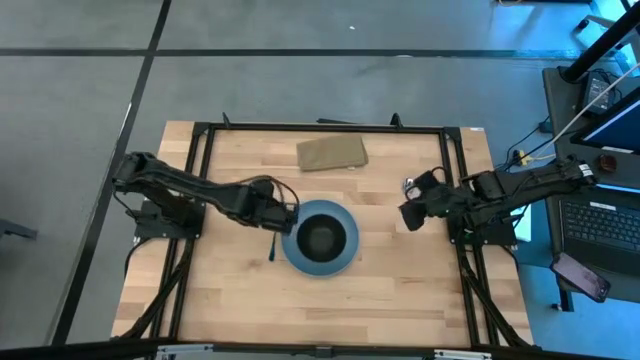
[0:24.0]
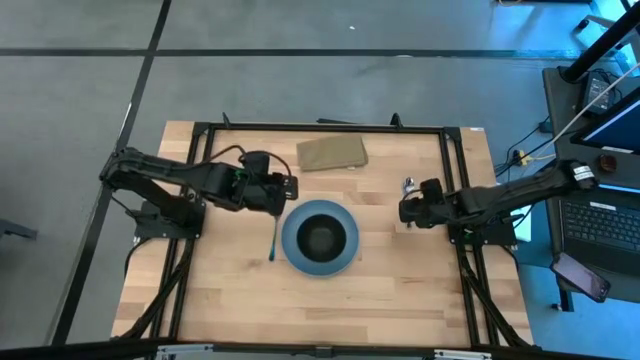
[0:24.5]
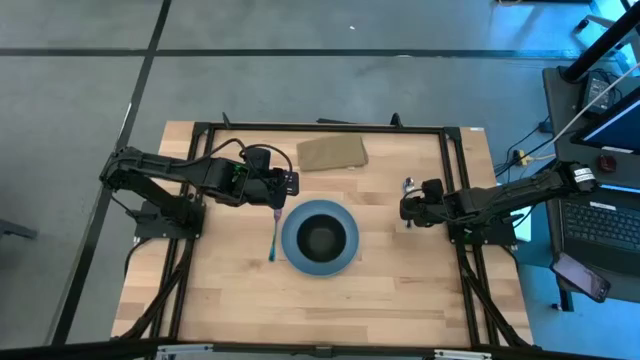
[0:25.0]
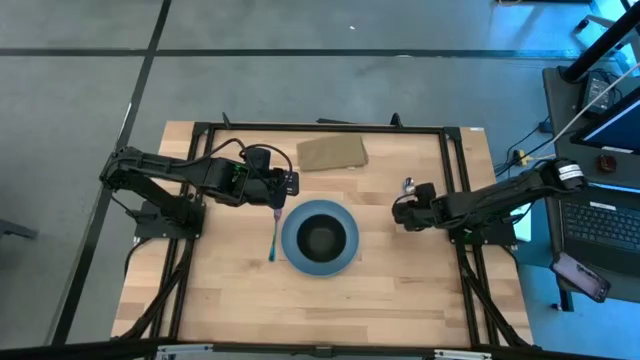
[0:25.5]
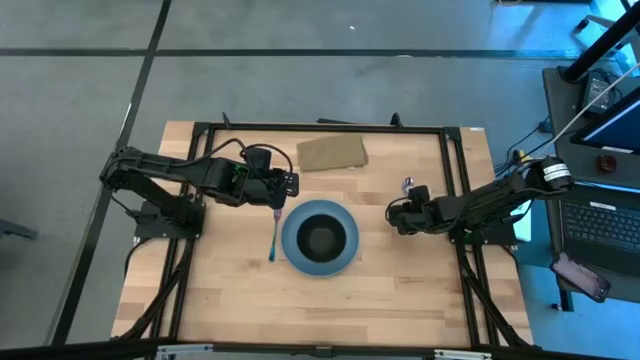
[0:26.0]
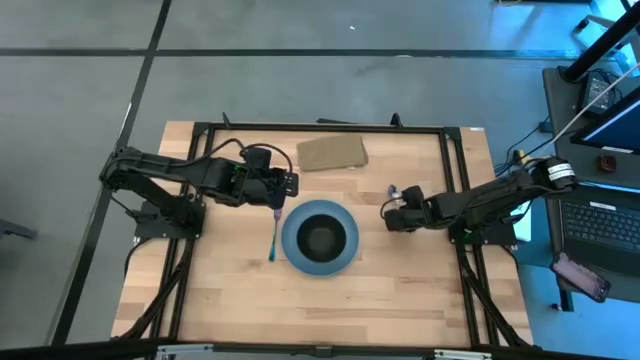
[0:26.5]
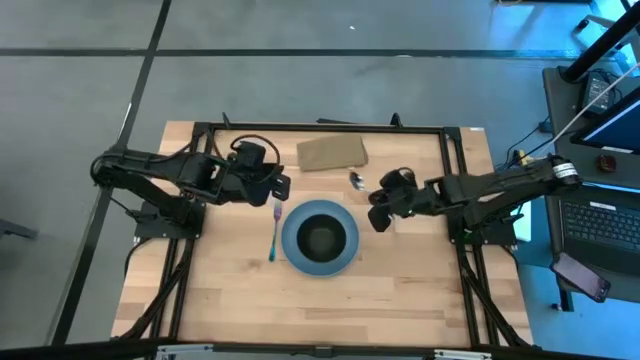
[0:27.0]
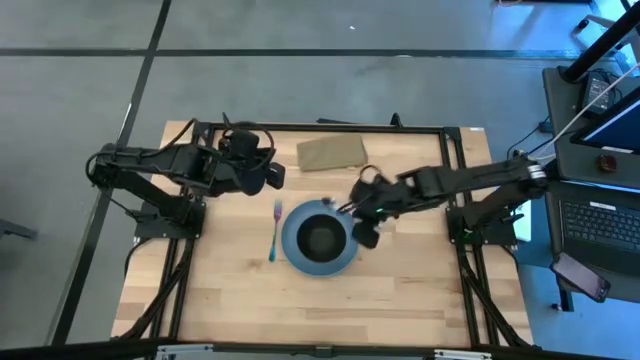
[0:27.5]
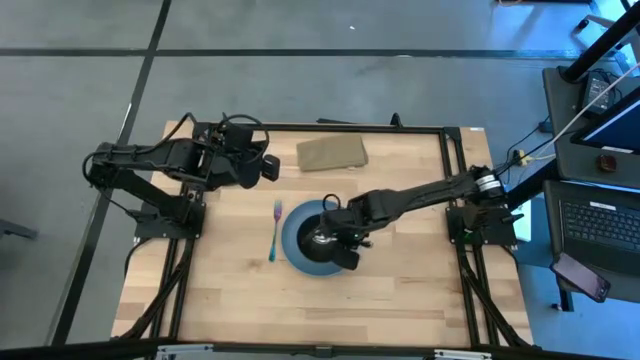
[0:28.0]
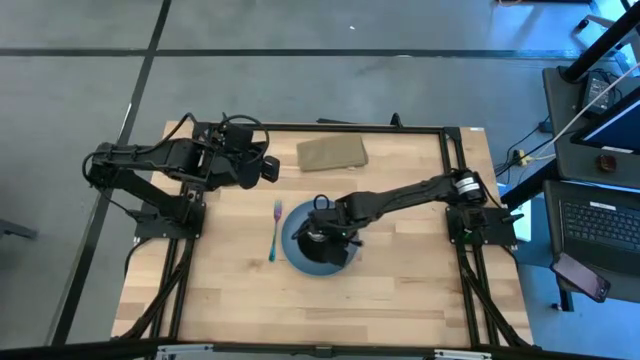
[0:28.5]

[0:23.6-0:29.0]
Task: Set table place
Put the silver spoon into the black bowl

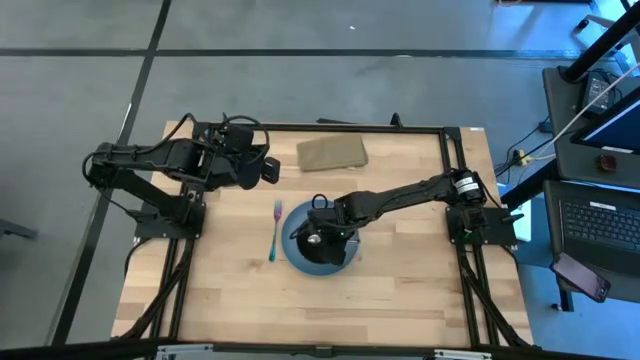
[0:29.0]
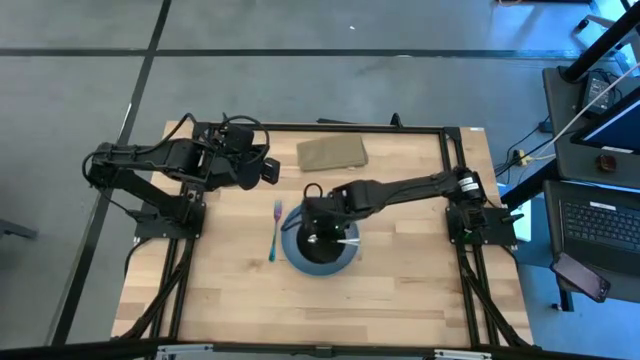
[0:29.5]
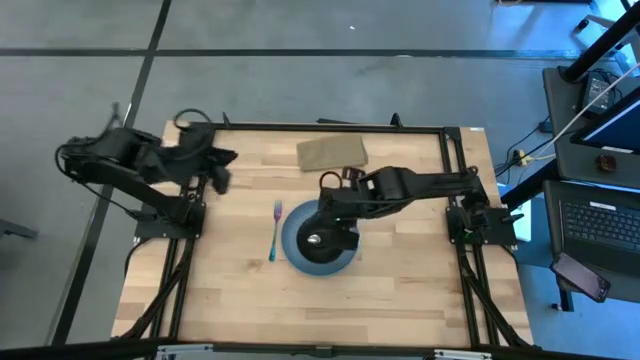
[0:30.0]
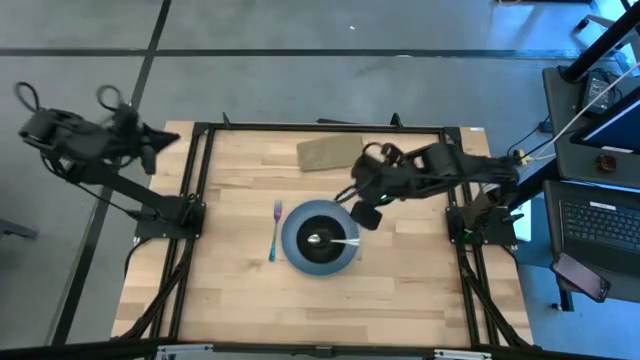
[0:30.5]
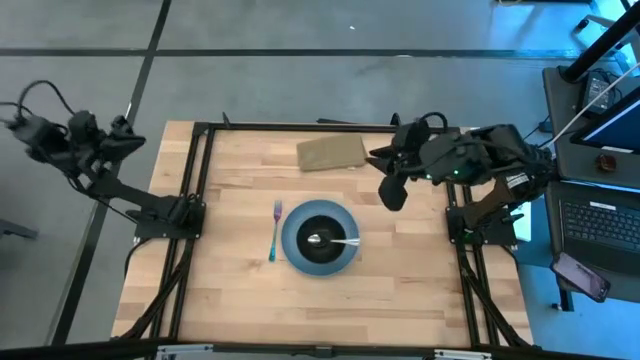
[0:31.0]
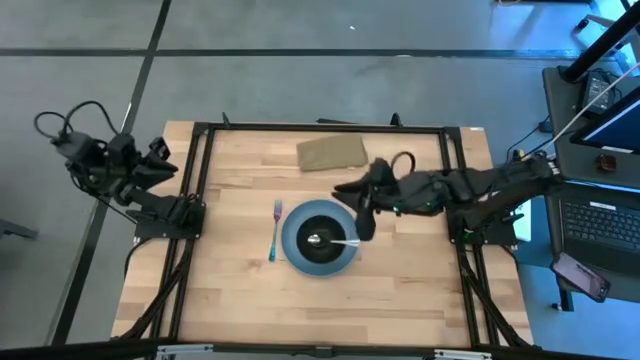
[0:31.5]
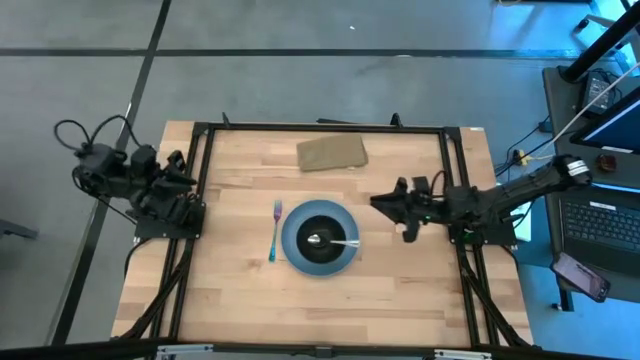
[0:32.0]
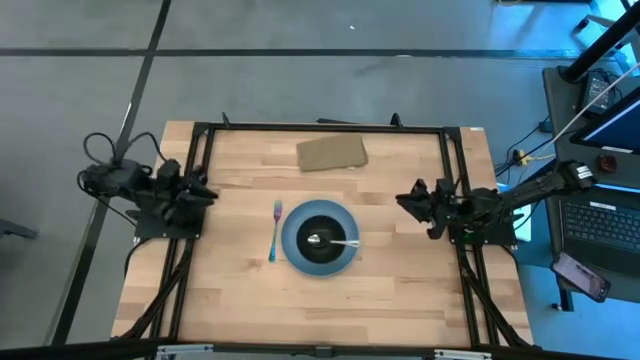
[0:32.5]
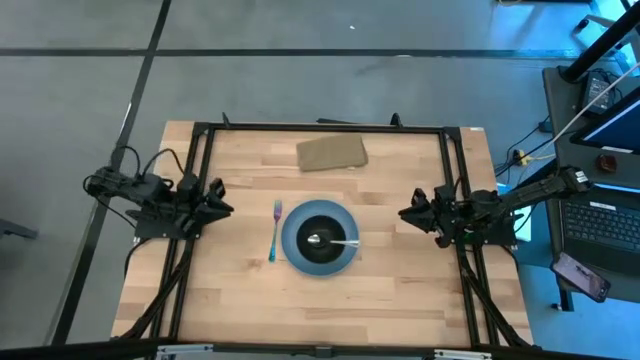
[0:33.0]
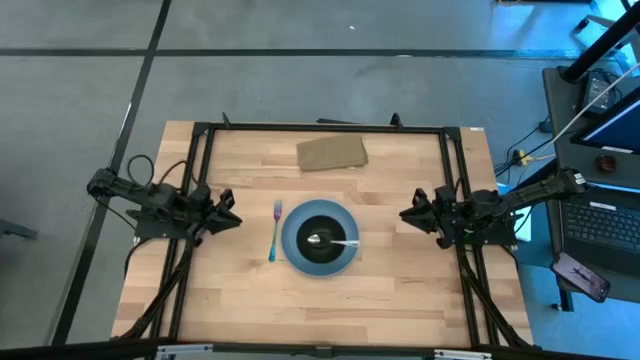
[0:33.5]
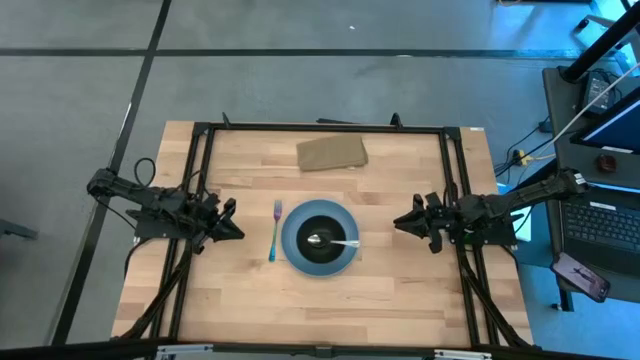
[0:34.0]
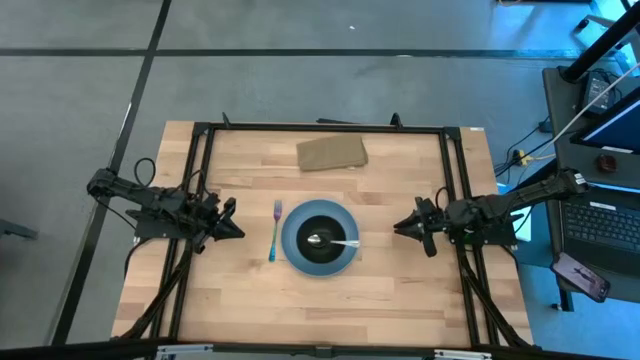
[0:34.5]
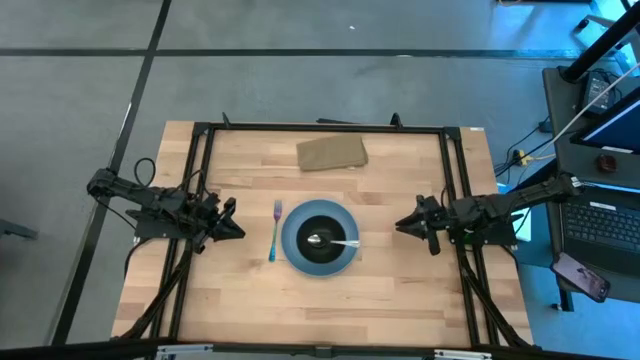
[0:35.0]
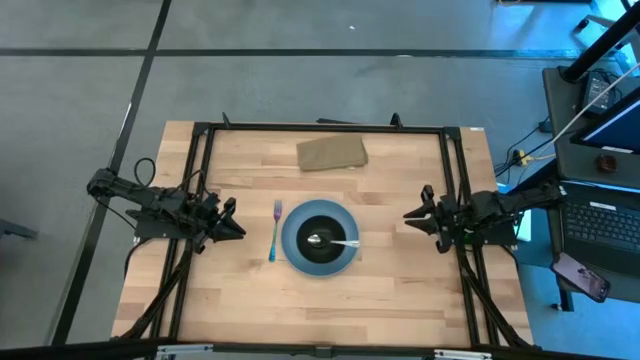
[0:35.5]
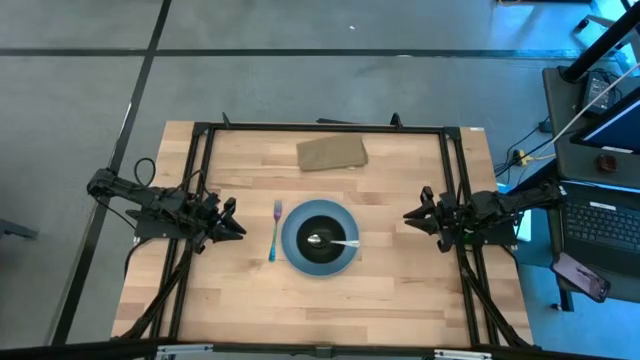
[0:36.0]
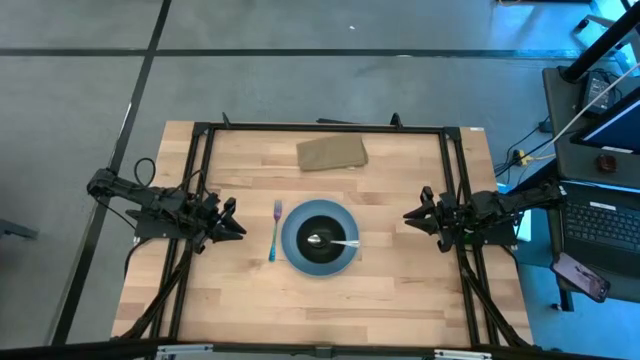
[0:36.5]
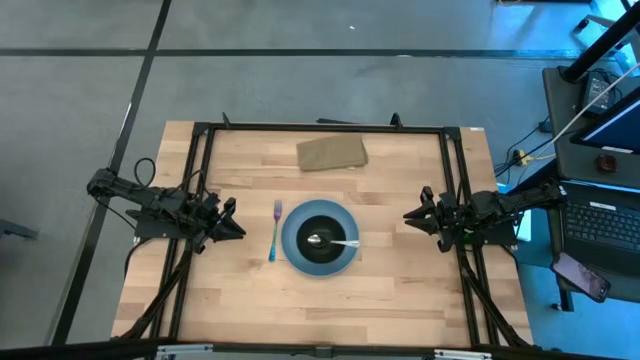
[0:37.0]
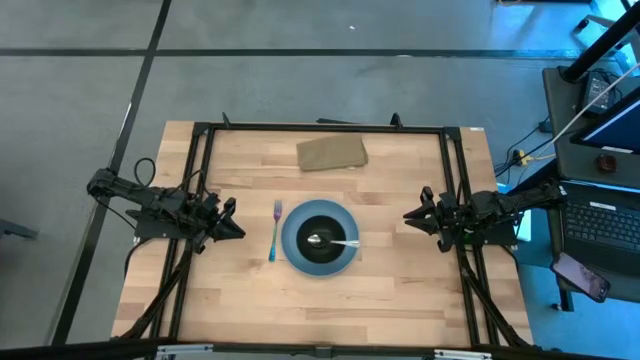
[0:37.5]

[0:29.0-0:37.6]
Return to Home Position

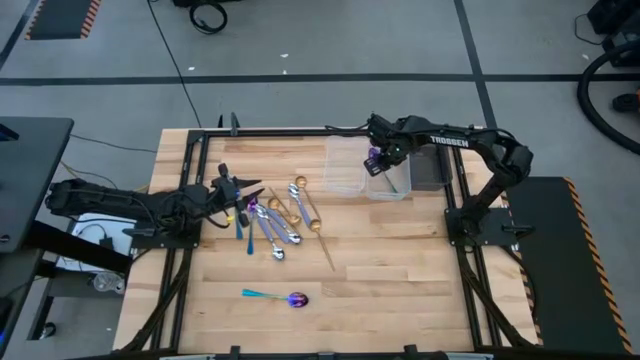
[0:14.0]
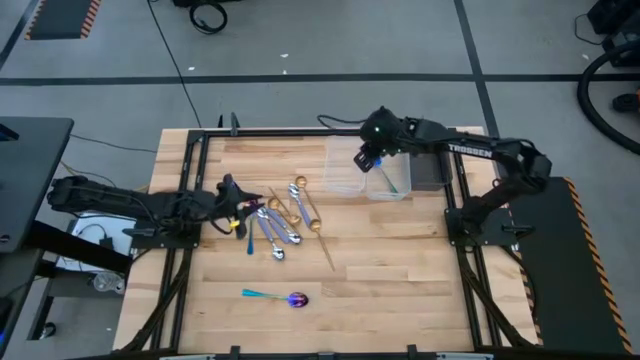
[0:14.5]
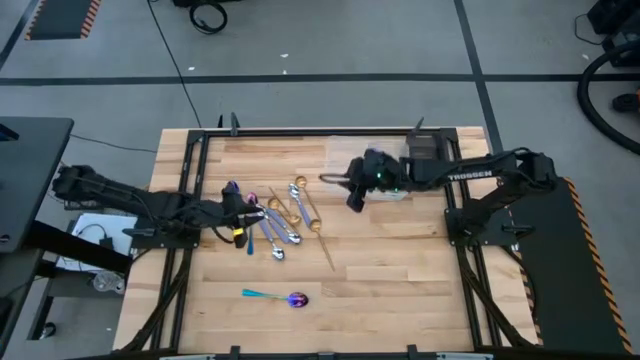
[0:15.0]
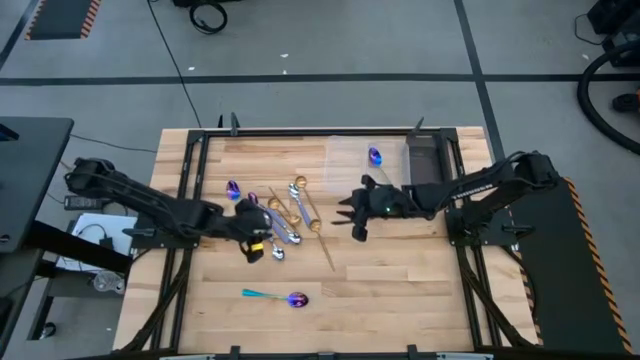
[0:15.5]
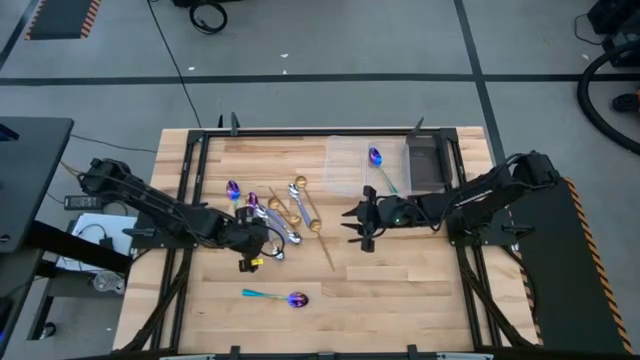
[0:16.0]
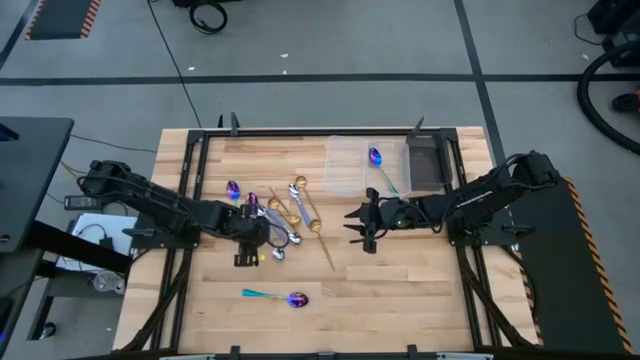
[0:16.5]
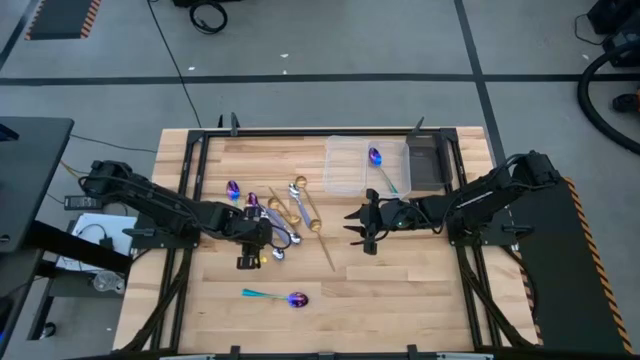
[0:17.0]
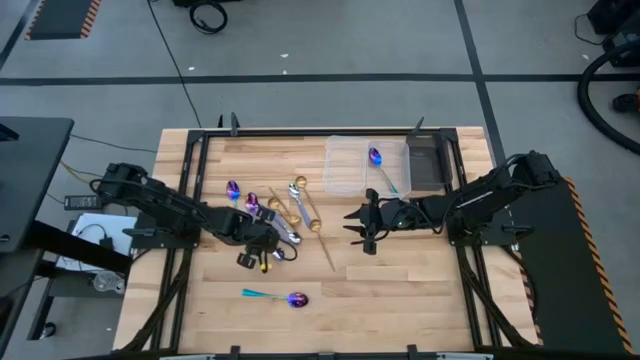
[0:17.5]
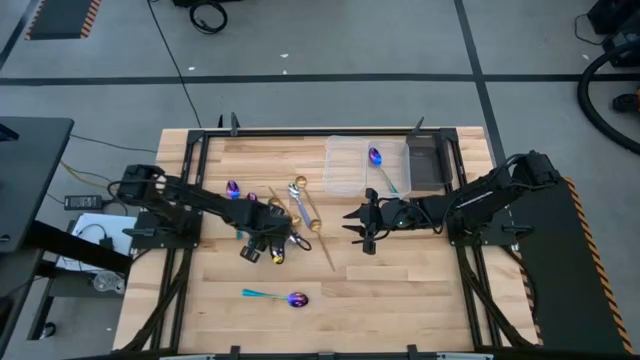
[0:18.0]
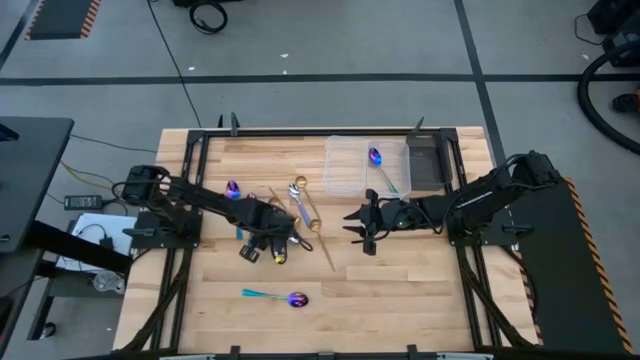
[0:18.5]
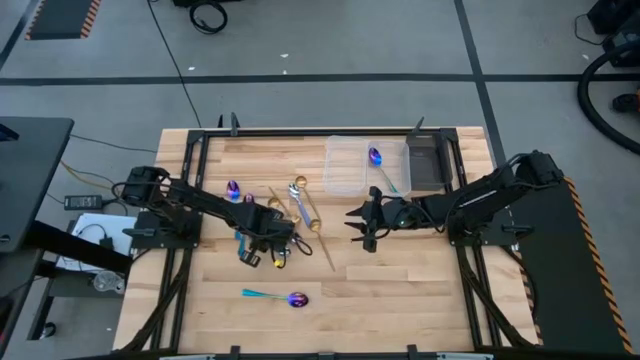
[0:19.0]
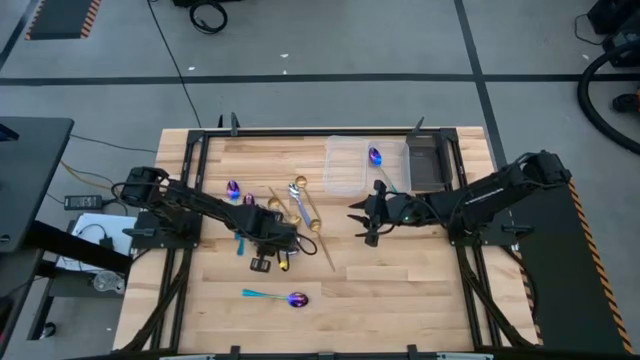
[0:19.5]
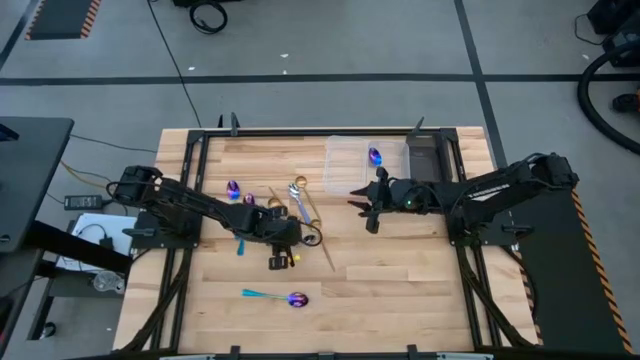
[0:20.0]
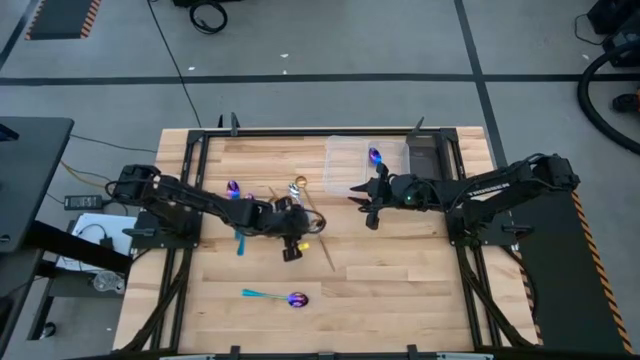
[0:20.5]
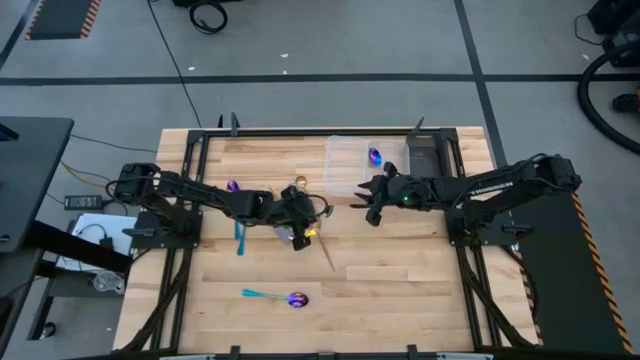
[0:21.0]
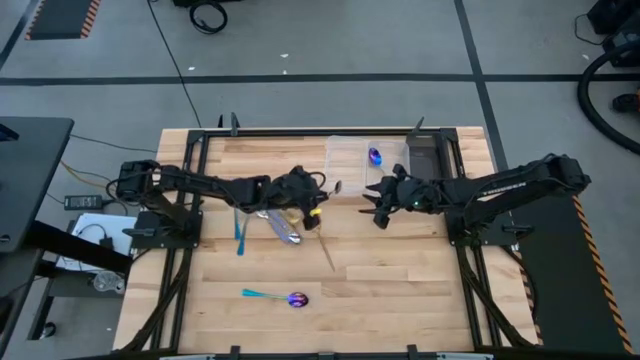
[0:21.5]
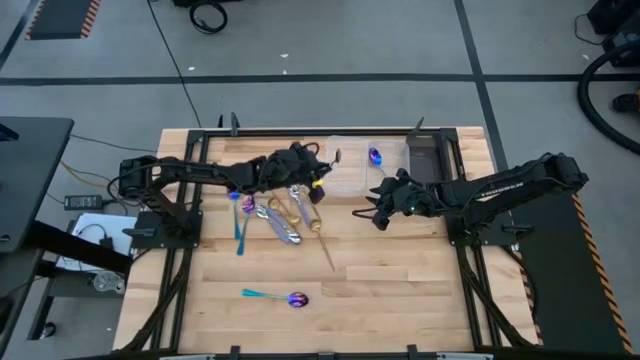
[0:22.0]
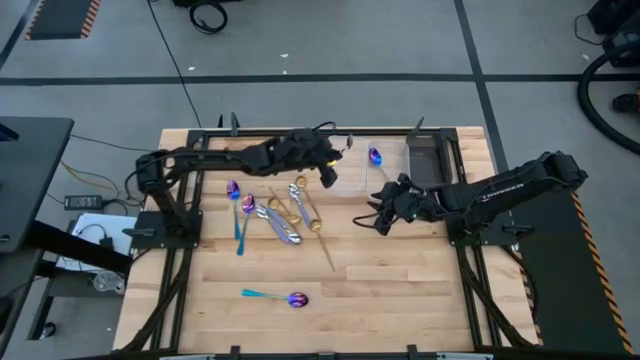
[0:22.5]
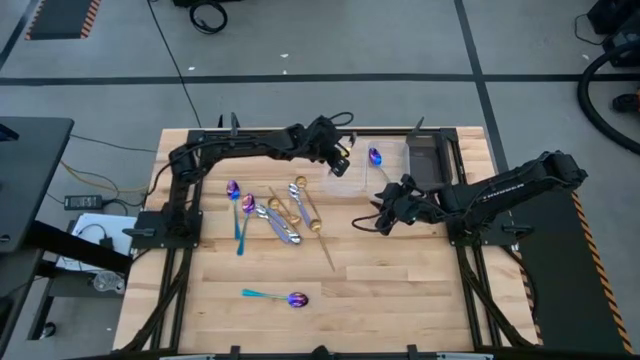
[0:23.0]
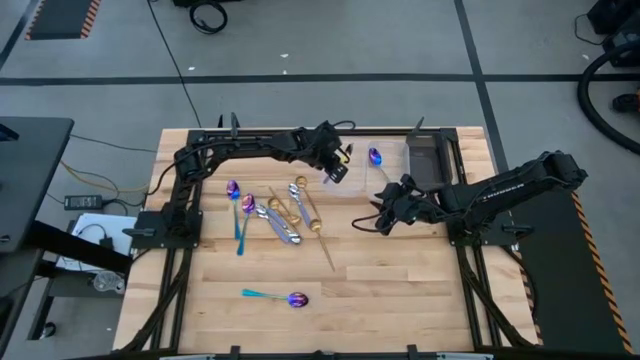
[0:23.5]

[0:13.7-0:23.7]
Task: Sort silverware by color (type)
Put the bottom left gray spoon into the left transparent bin
